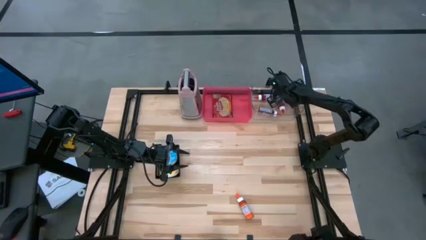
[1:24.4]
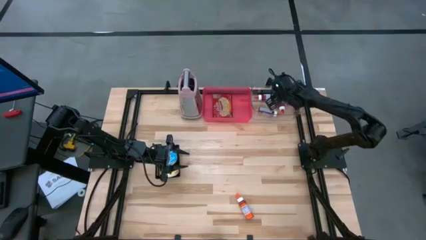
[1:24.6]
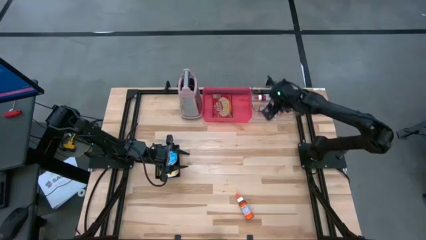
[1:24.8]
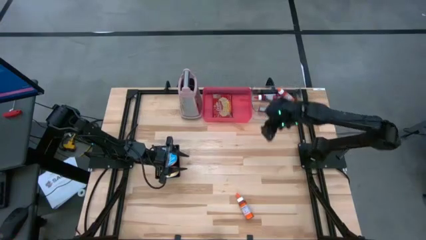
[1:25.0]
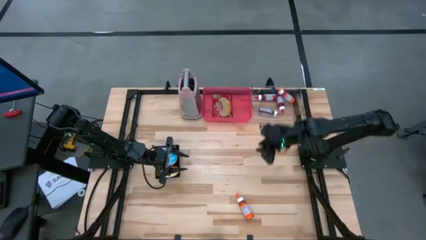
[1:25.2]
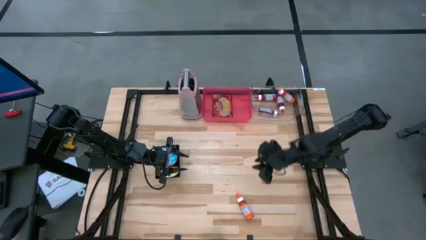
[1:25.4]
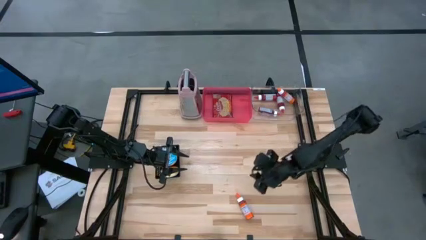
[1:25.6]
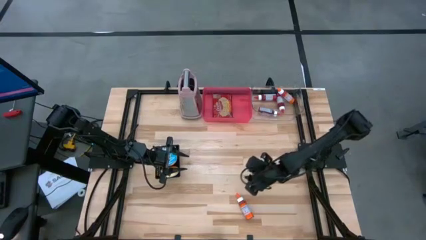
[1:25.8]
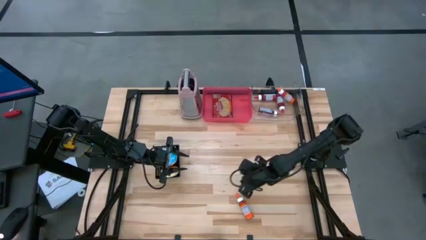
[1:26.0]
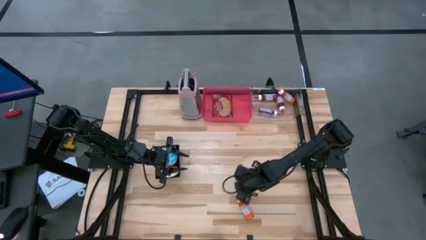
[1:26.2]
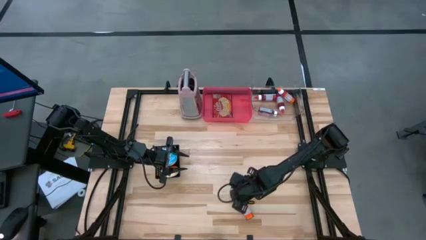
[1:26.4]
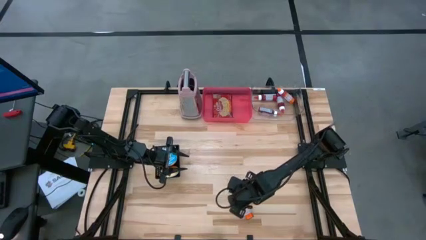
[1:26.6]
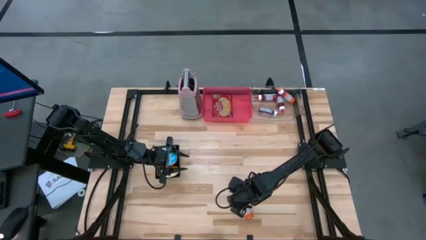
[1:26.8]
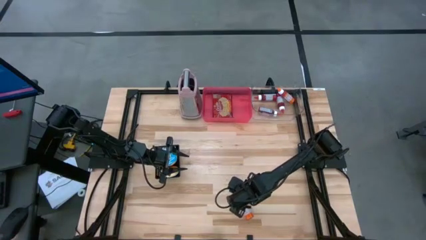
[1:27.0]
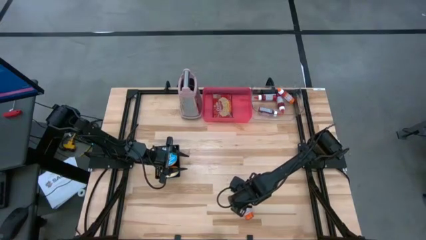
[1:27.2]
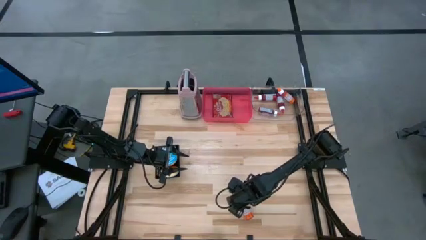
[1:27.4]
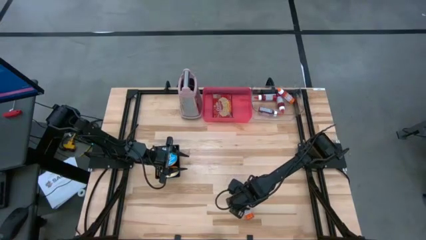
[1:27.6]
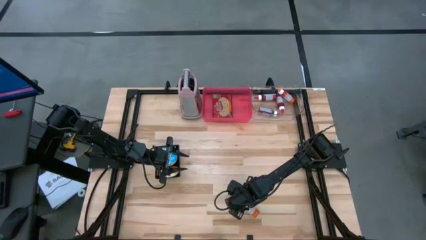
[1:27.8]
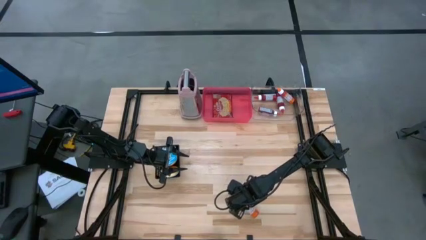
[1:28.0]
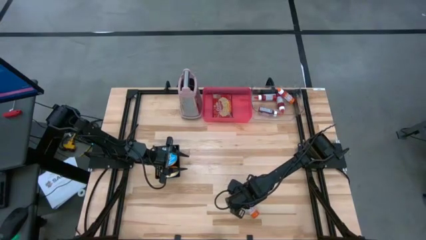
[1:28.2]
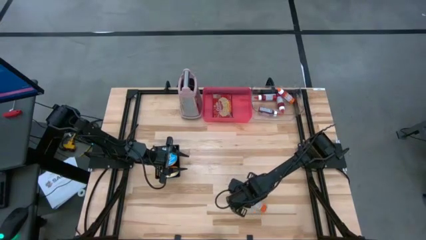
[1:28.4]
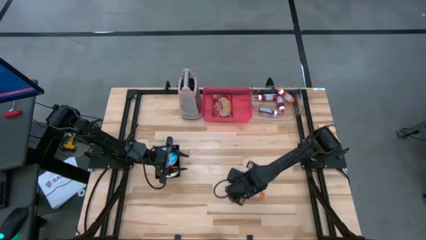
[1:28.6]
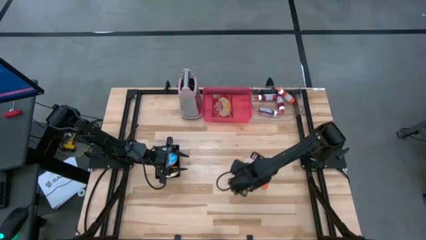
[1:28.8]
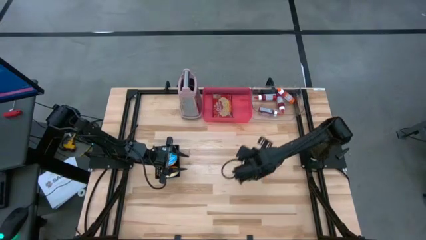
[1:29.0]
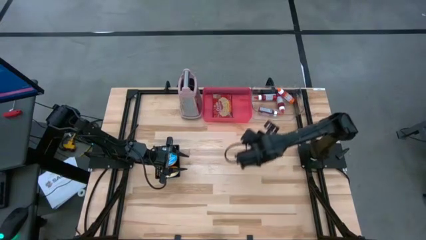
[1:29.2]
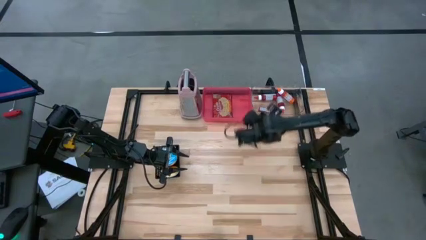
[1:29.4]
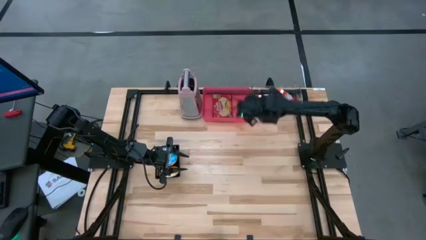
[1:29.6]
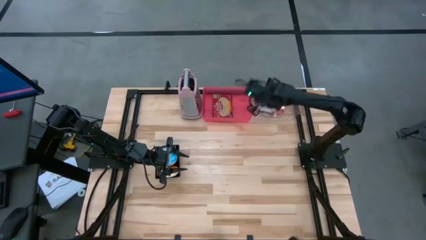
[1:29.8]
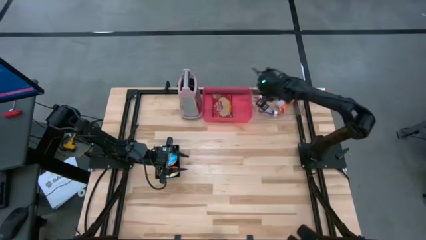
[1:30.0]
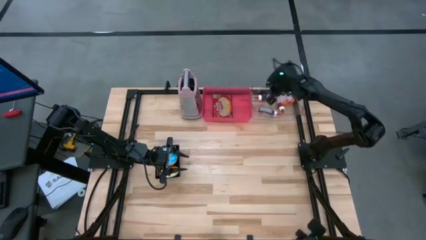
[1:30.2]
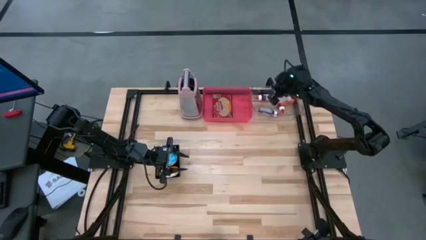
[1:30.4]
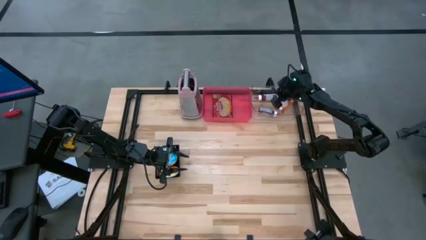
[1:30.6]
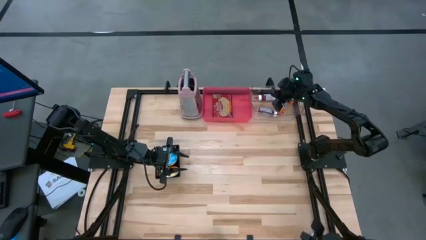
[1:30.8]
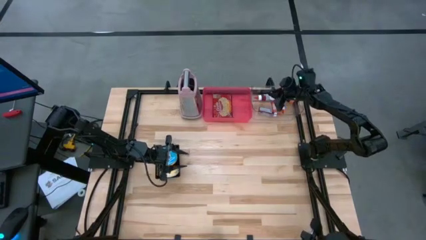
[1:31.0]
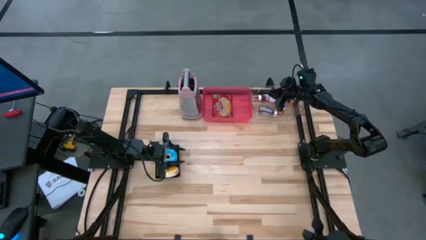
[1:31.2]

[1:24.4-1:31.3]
Put the orange food coloring bottle into the transparent bin

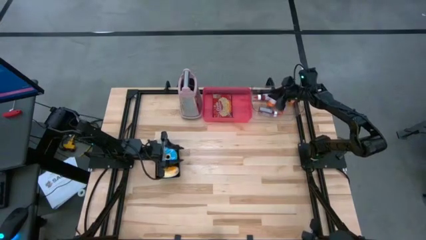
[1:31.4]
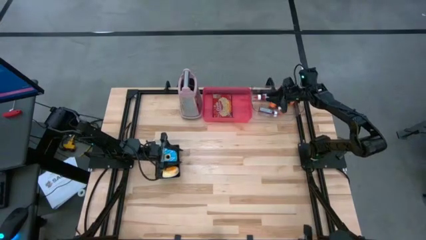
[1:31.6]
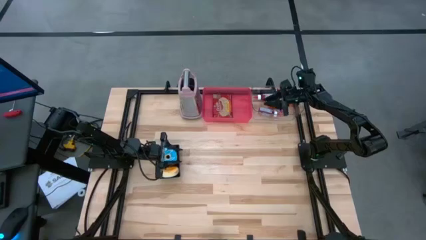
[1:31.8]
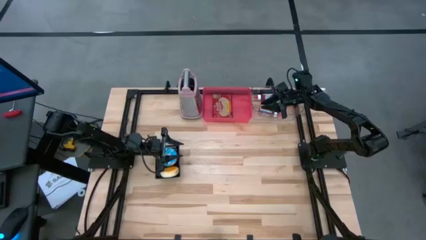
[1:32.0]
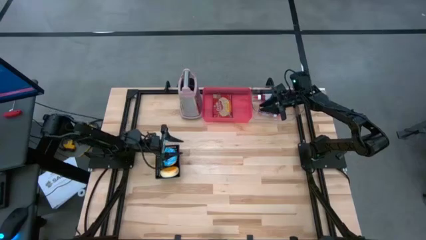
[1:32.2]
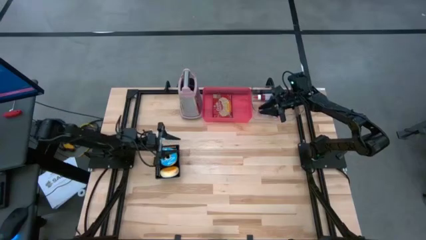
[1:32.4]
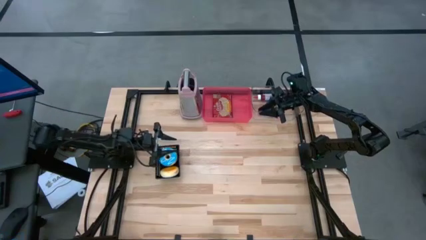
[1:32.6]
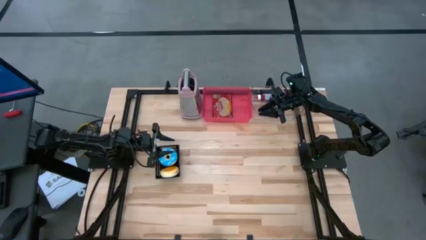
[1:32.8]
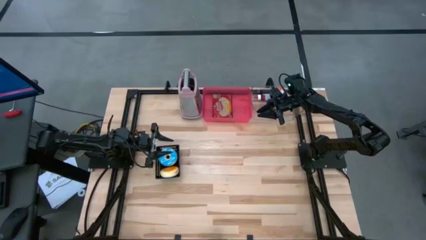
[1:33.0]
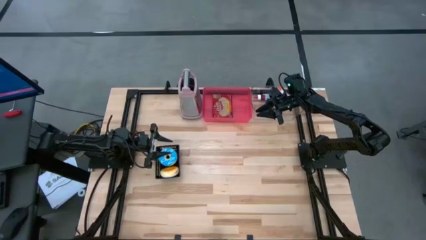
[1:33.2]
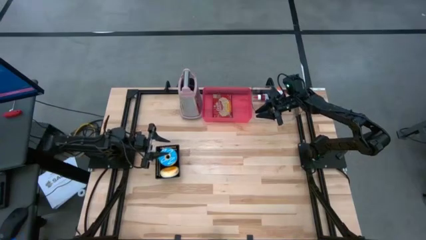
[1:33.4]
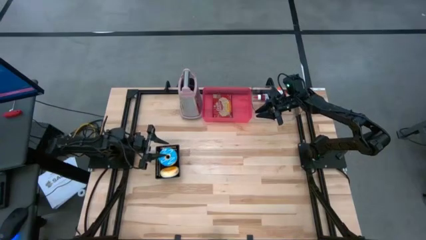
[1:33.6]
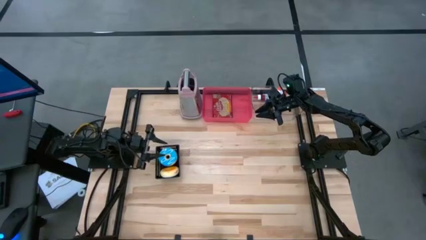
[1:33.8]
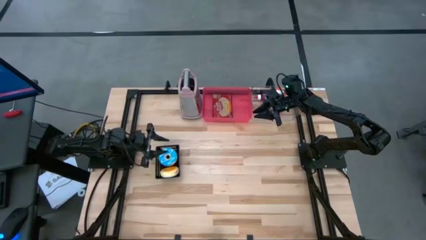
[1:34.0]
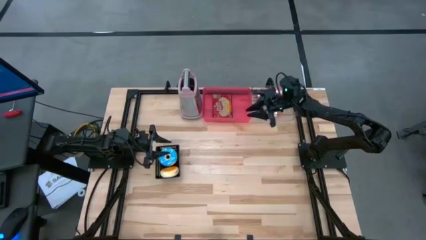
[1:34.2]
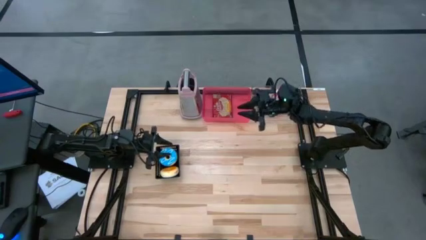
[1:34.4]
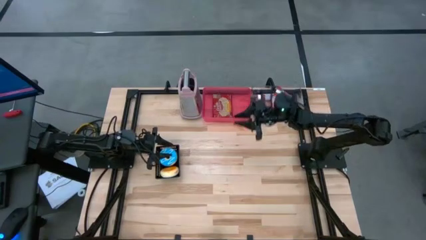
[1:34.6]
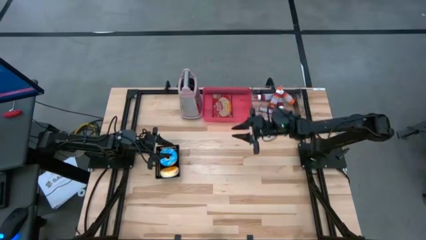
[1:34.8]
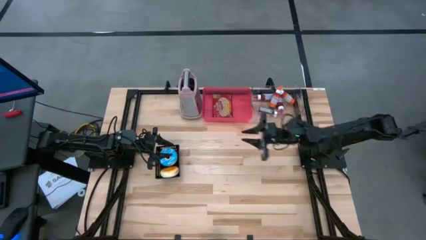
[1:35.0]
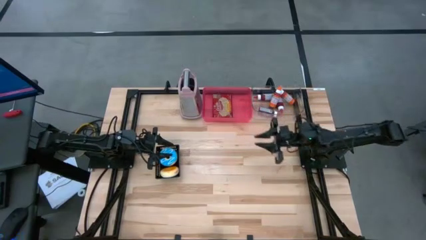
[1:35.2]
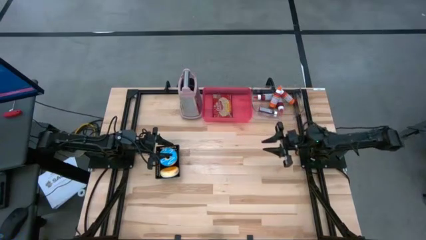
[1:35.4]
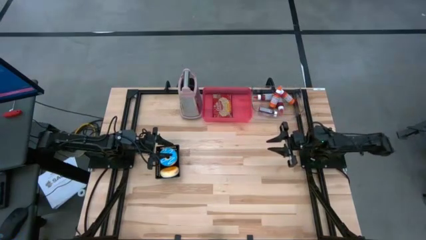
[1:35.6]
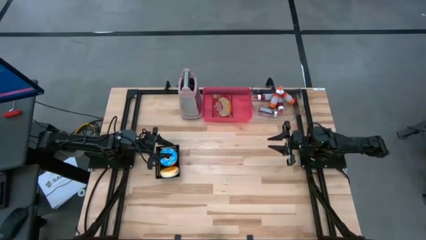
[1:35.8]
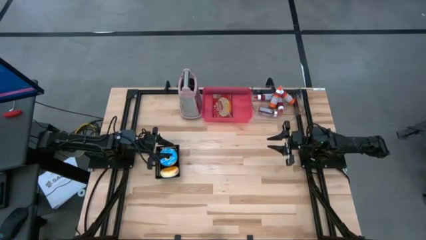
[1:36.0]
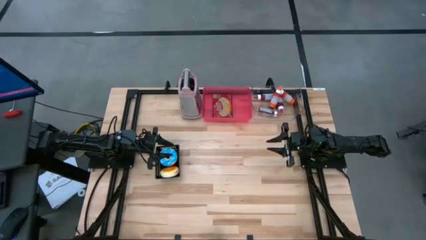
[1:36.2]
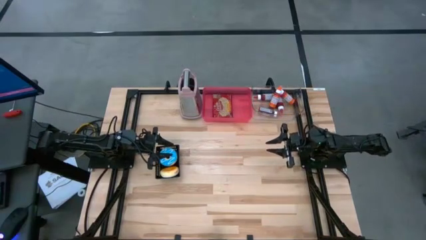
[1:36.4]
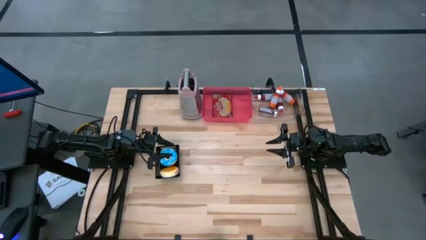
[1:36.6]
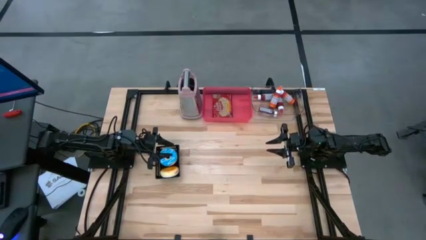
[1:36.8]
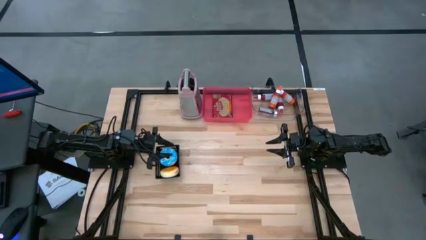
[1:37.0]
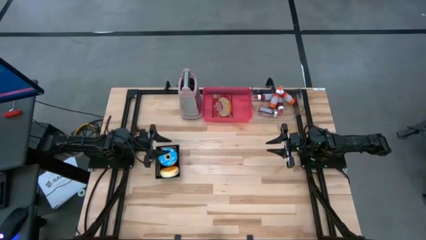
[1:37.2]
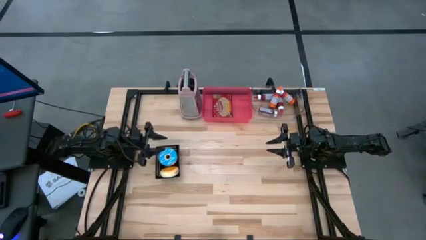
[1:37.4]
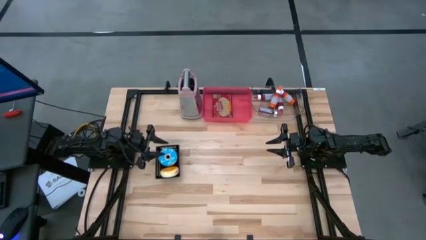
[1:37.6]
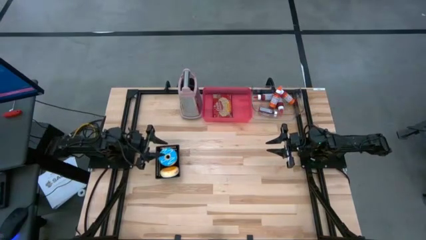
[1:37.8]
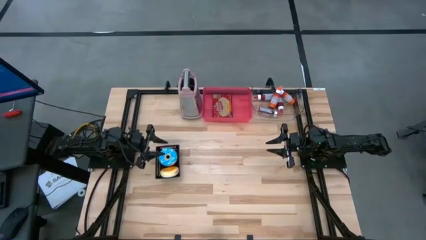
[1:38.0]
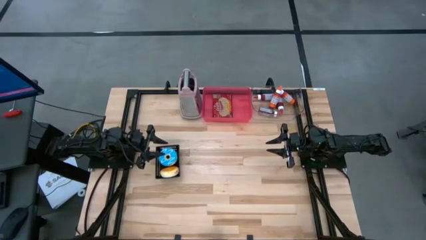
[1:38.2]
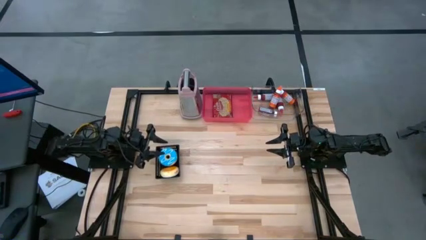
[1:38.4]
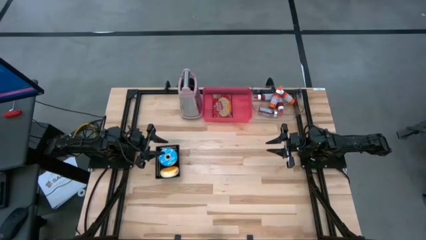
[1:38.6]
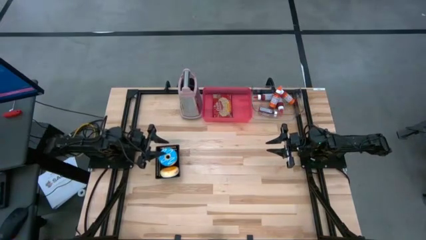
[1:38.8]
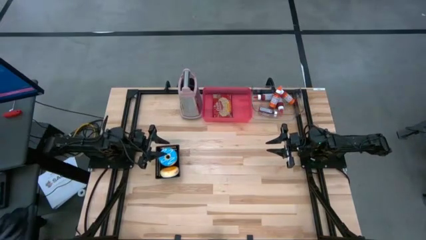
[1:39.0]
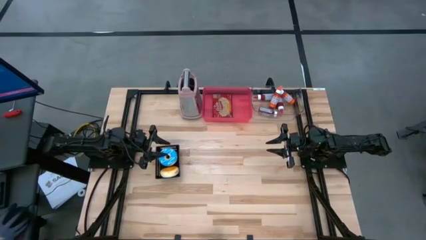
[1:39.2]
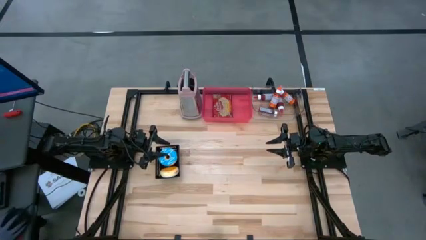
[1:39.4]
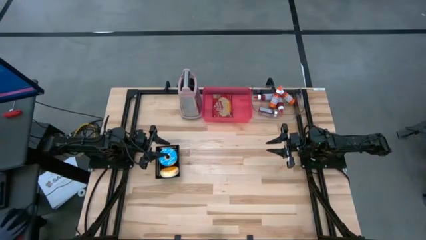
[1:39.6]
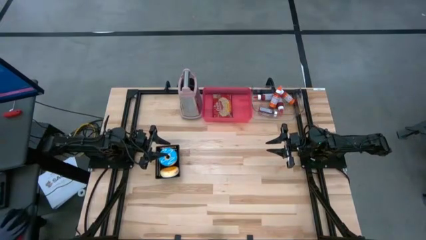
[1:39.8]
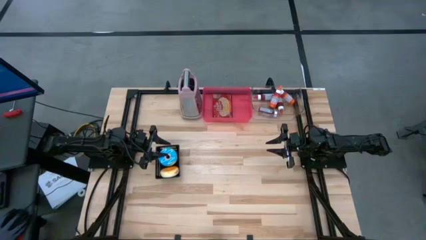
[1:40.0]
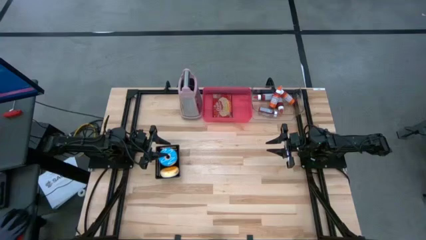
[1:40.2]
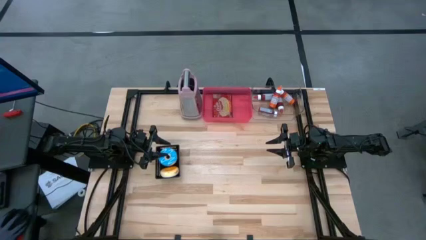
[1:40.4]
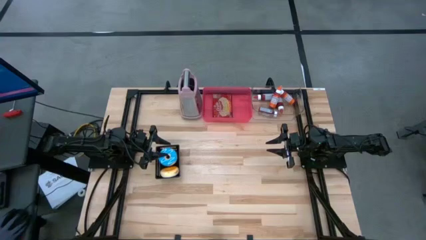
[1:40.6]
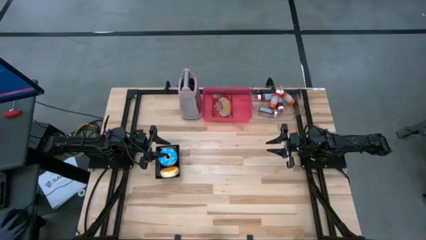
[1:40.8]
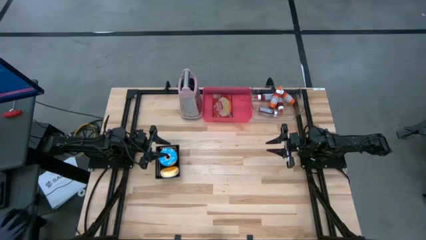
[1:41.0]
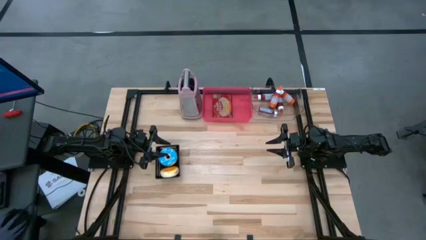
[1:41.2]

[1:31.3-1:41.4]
Return to Home Position
